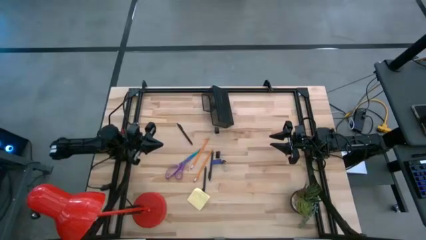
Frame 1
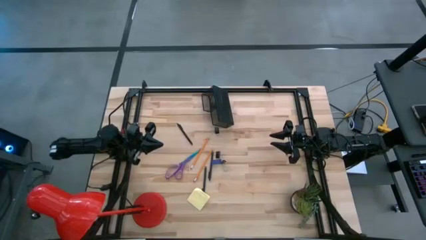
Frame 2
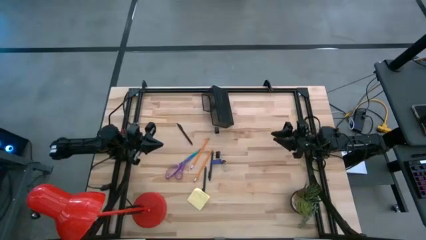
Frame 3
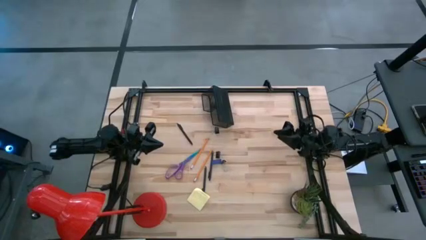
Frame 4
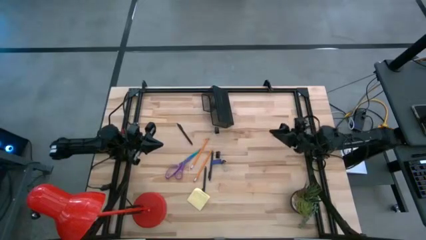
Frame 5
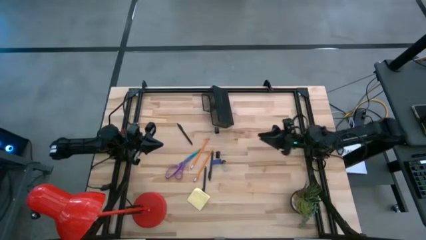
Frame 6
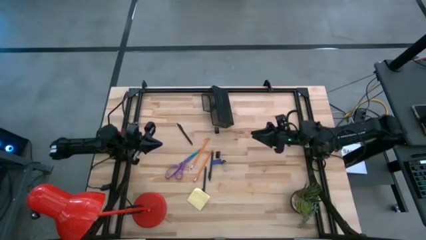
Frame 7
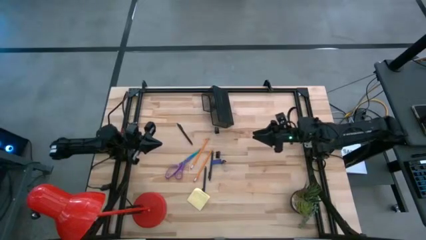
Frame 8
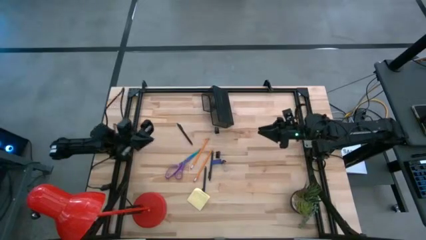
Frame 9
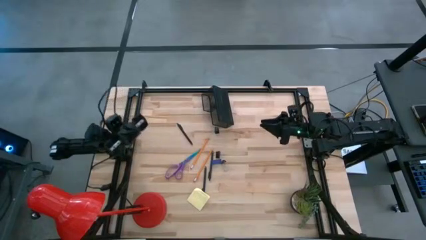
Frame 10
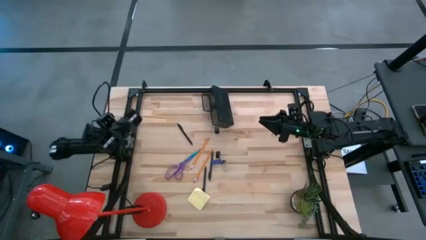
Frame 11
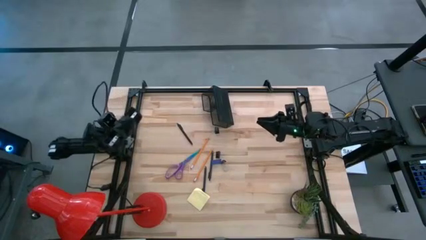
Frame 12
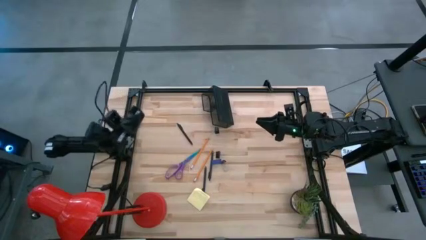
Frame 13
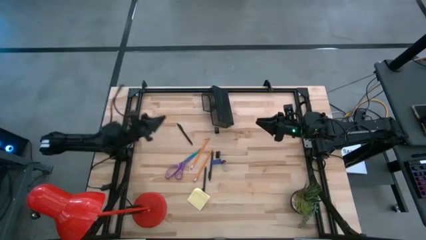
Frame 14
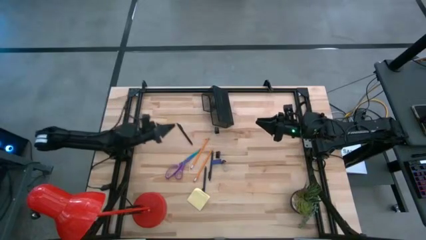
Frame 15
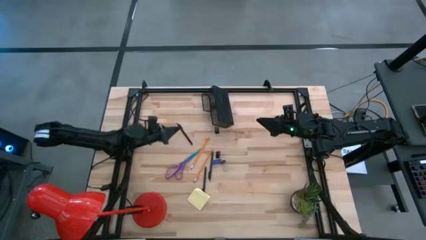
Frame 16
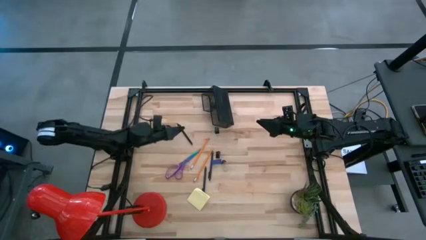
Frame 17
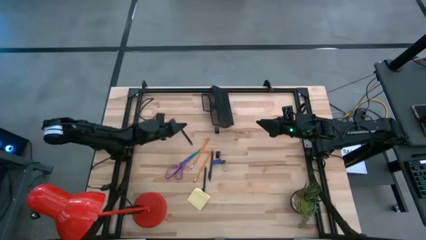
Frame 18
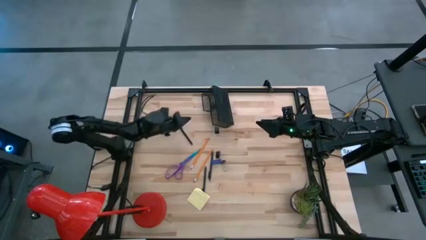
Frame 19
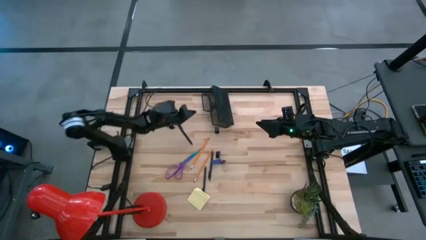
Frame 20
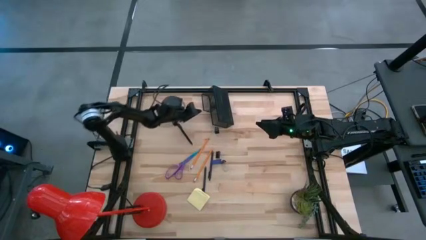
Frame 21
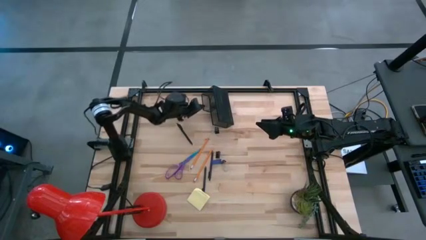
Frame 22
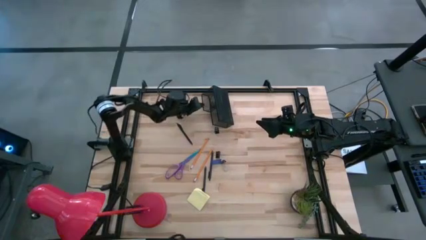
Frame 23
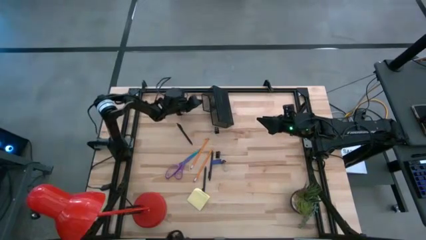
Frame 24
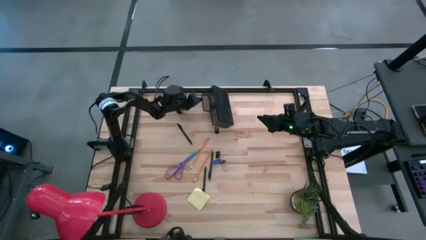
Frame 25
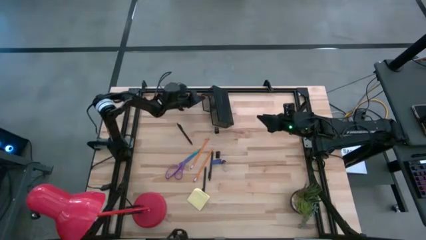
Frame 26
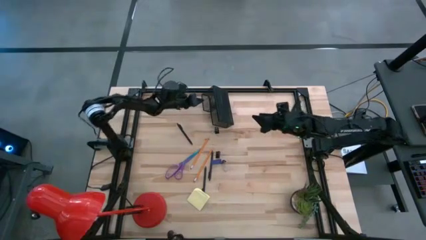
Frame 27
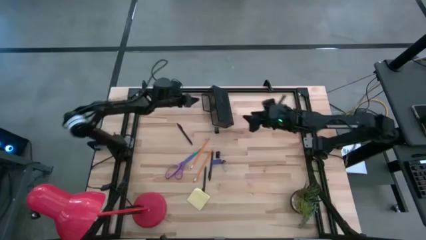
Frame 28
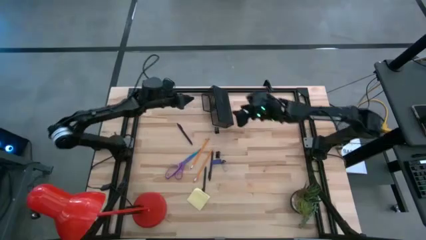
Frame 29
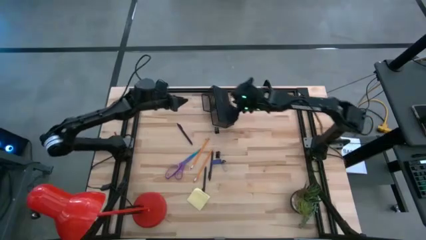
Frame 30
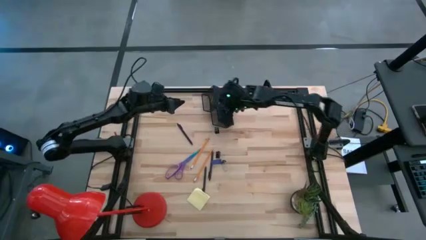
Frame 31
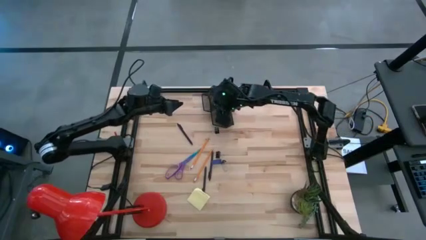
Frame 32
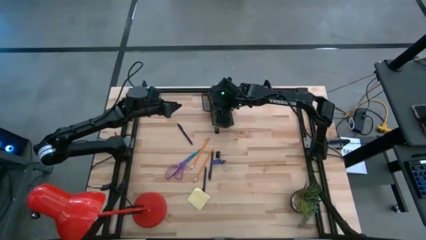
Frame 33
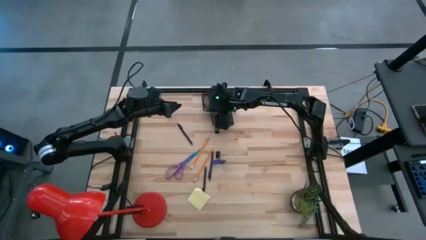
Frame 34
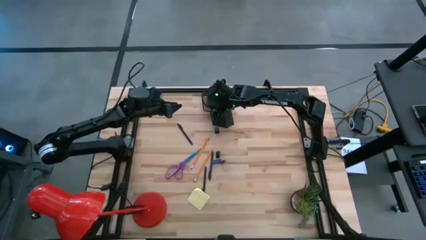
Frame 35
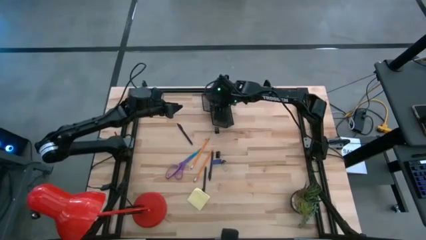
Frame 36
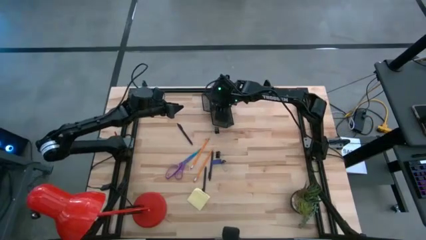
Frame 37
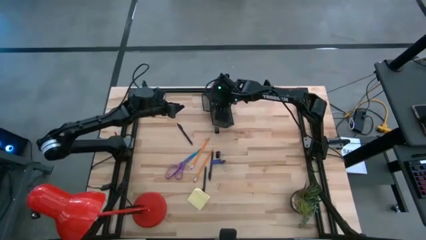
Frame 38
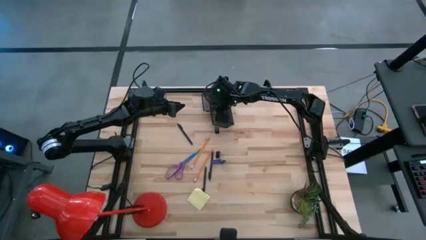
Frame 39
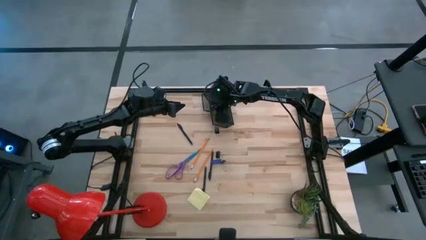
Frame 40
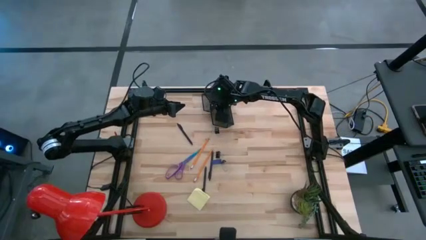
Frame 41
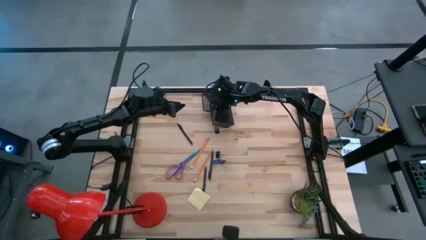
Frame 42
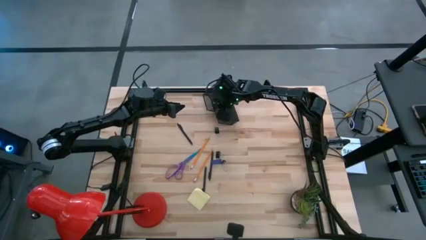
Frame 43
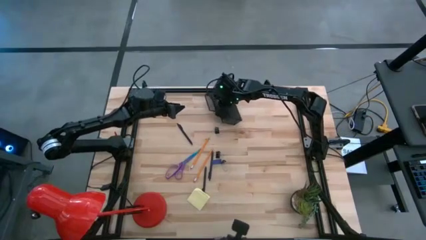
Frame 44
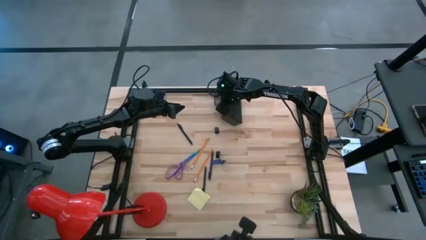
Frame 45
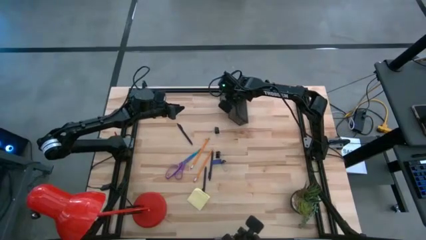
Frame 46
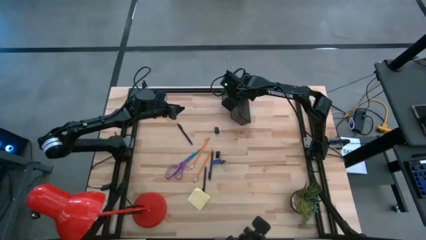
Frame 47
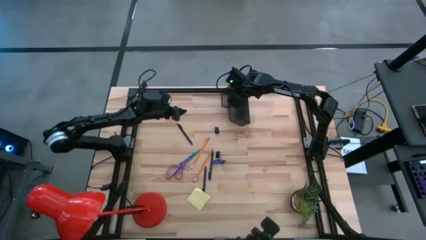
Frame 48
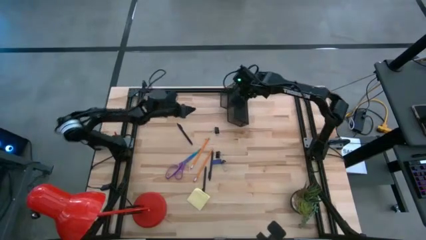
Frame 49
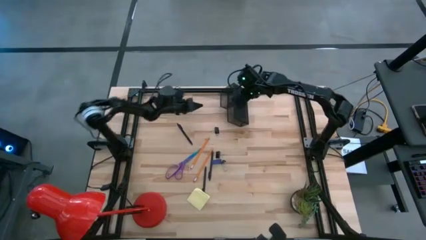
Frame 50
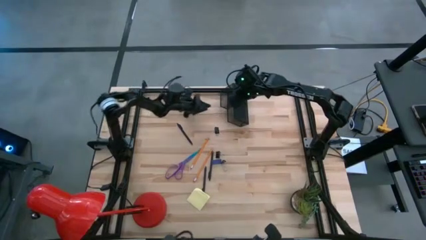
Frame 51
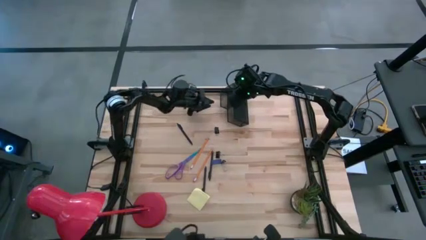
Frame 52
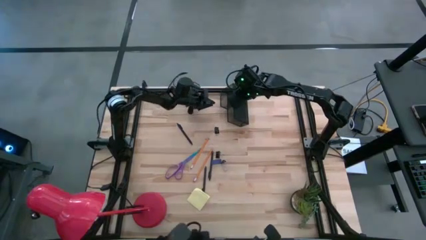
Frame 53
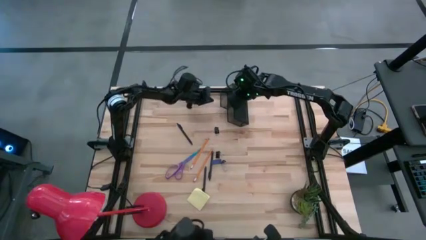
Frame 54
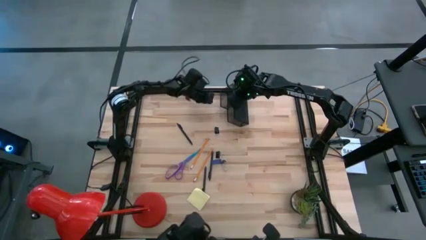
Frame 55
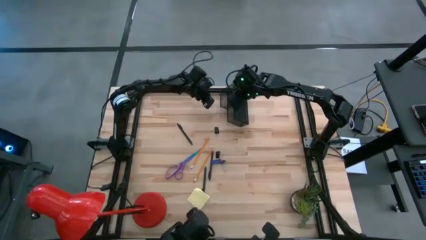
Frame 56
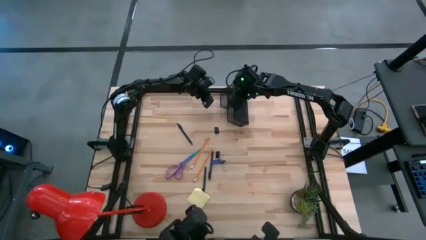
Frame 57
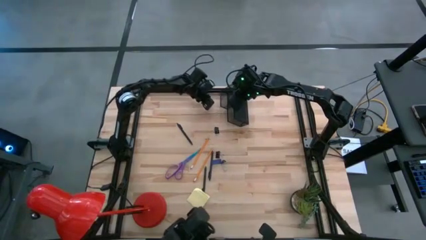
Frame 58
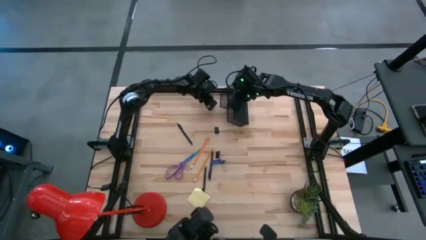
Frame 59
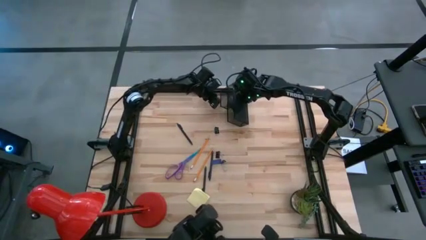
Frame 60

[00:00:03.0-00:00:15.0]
Task: Pick and place office supplies into organizer
Prepare the black desk organizer on the table
